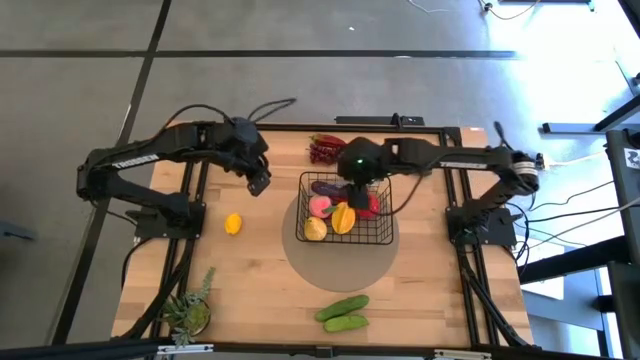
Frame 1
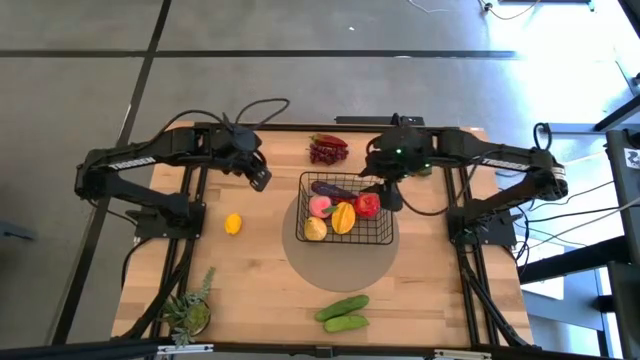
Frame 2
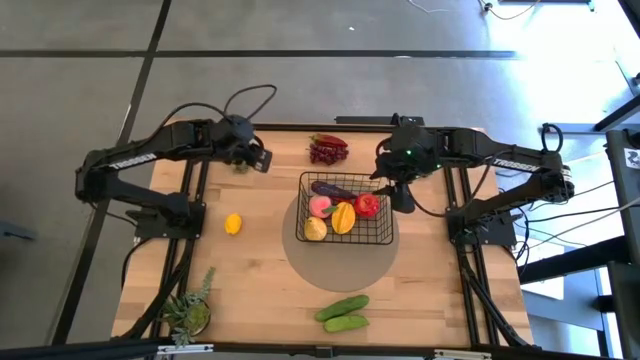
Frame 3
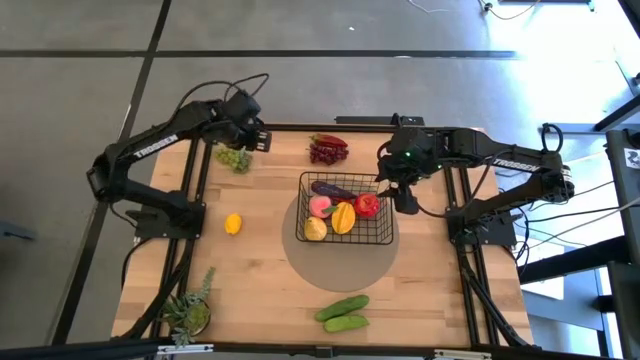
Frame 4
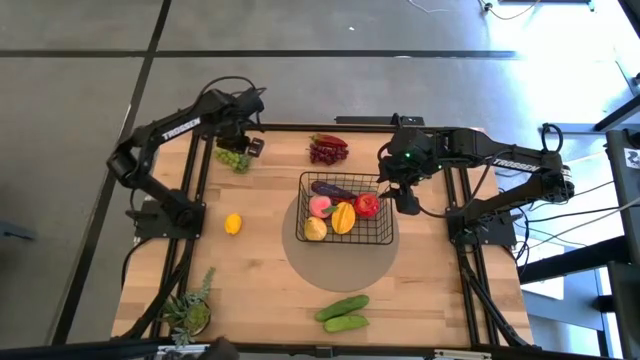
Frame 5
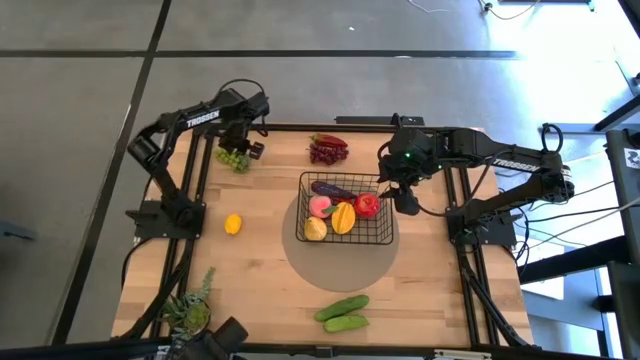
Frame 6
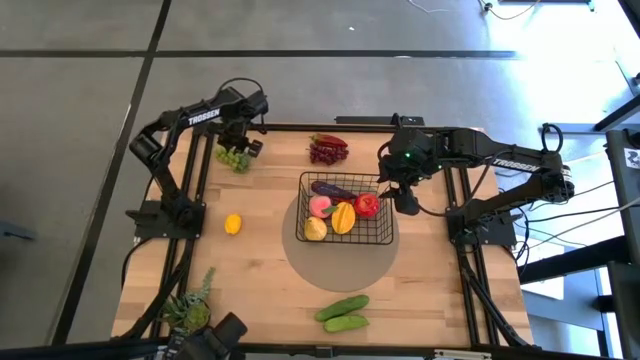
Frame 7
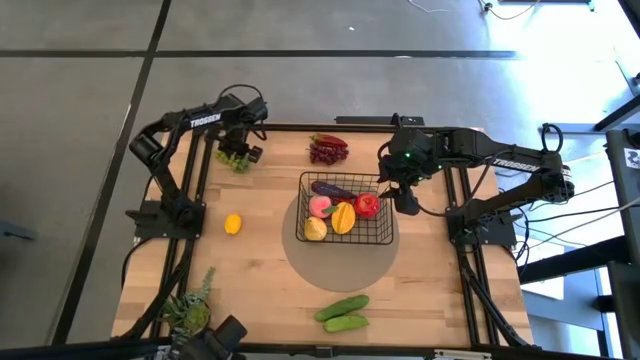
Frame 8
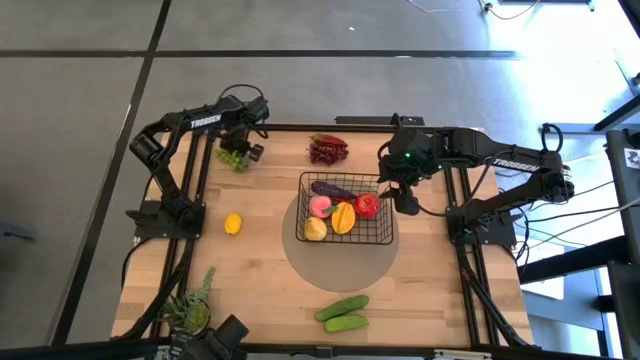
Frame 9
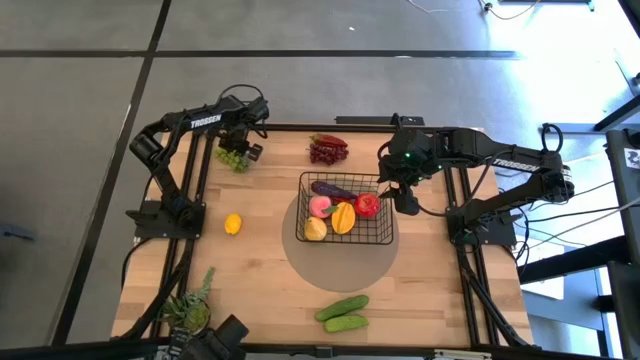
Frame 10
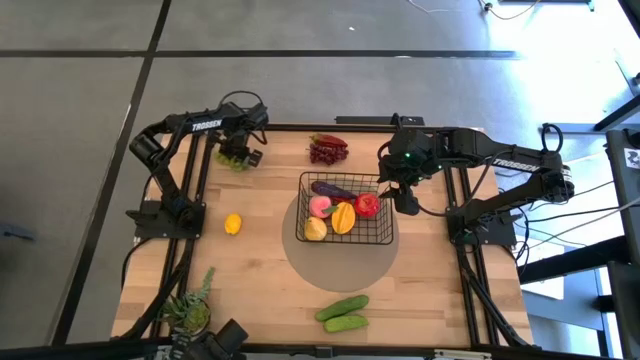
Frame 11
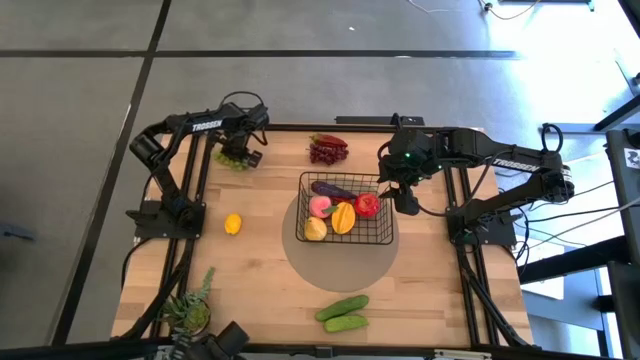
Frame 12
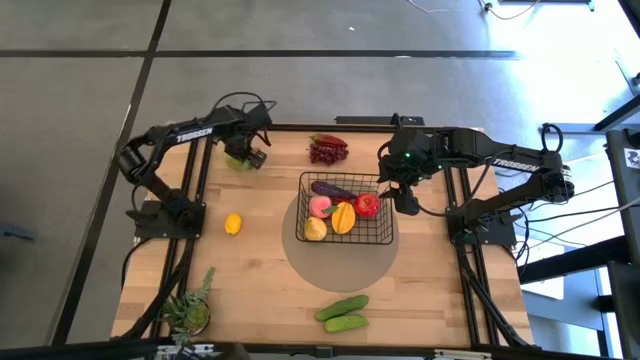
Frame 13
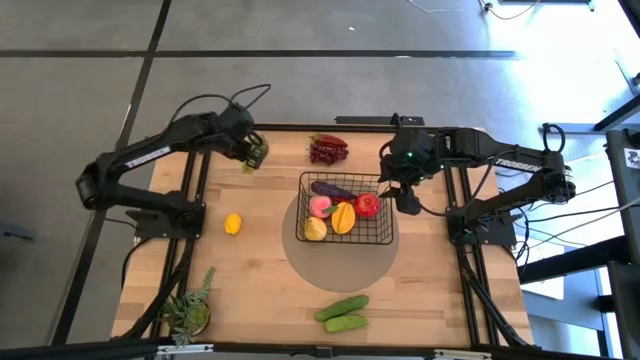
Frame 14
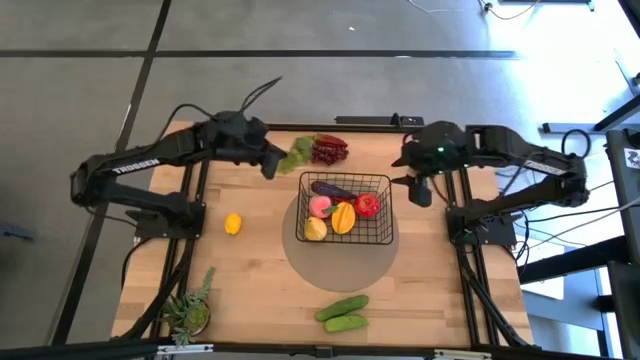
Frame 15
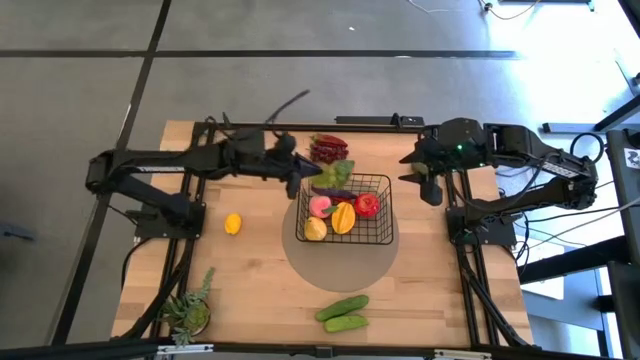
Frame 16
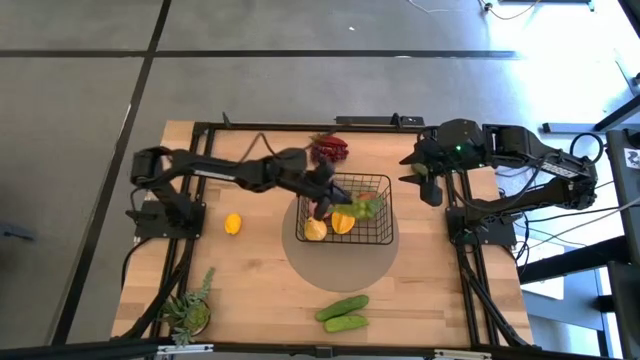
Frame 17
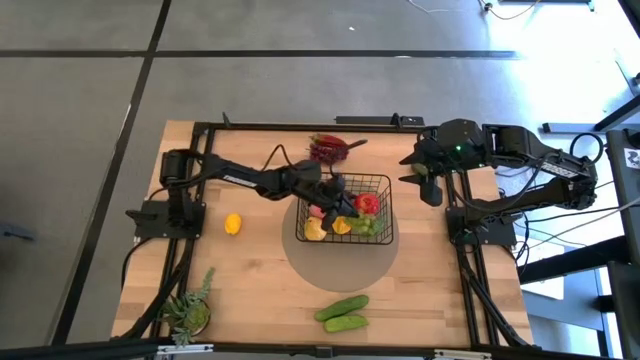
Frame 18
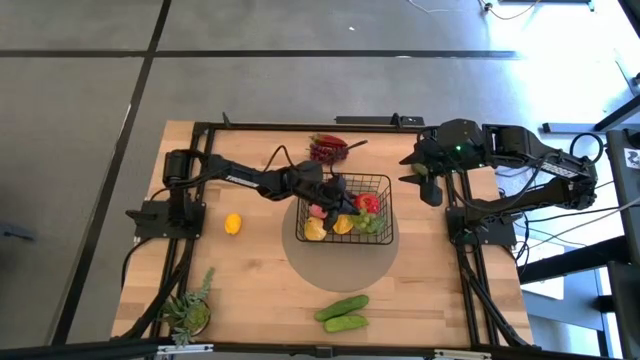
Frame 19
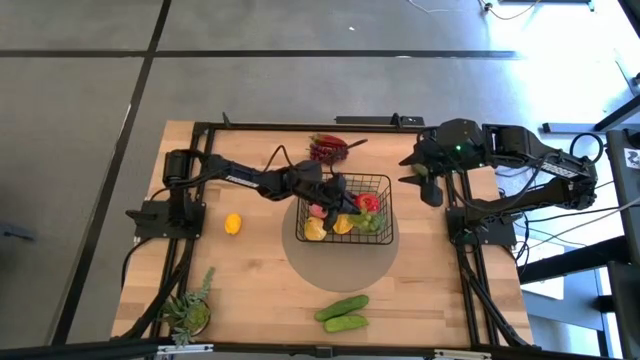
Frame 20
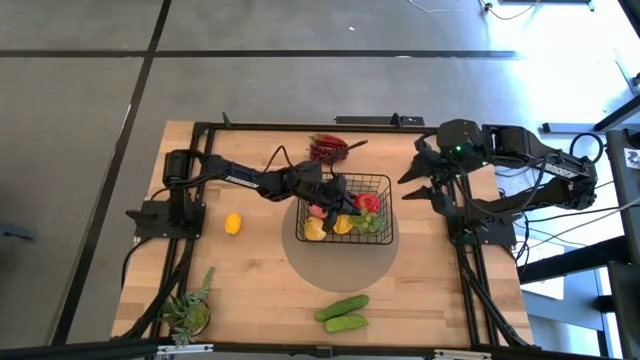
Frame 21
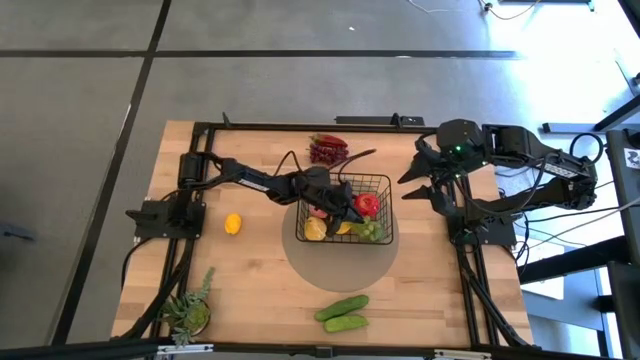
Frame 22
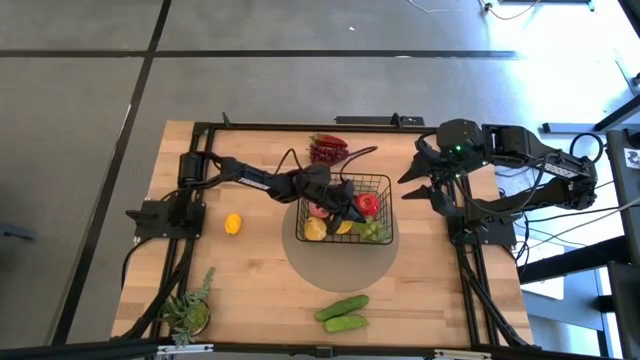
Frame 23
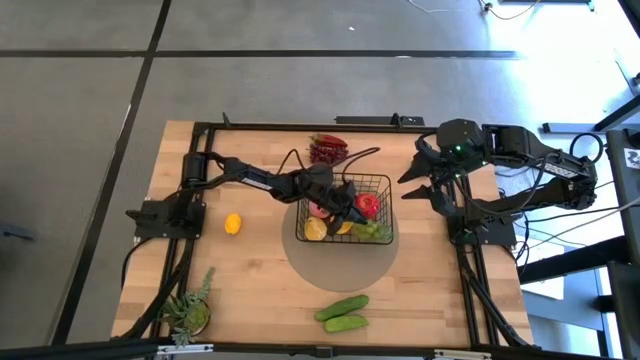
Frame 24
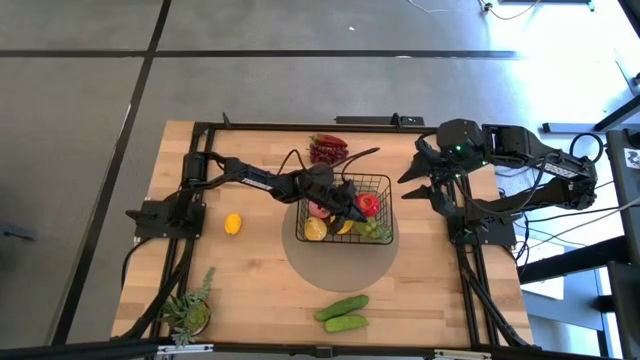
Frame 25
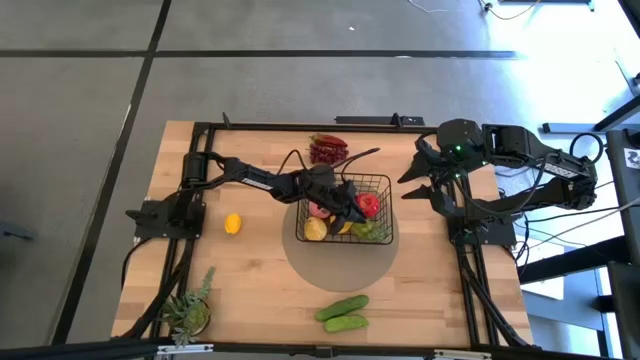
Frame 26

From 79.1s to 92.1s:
Task: Build produce basket
Put the green grapes into the black wire basket

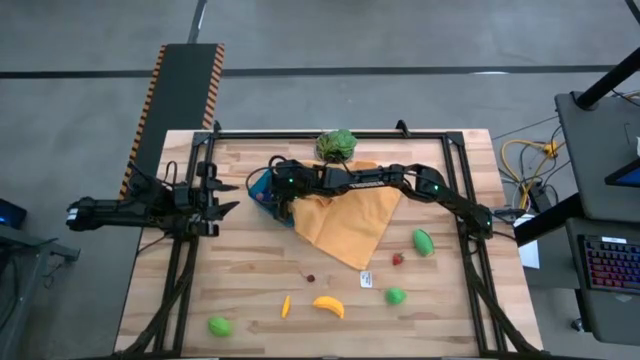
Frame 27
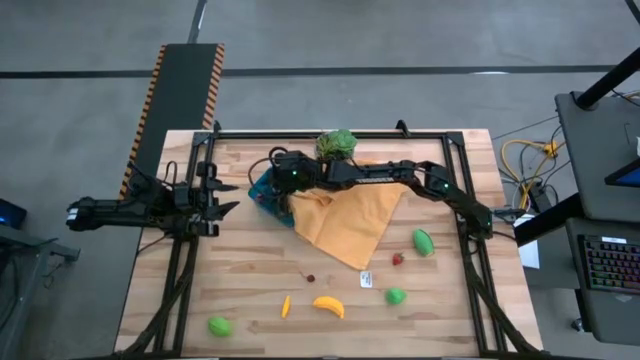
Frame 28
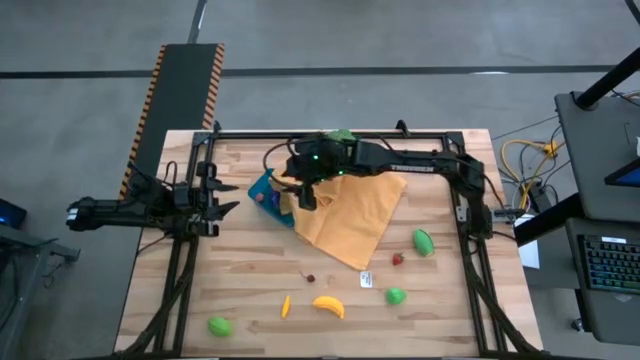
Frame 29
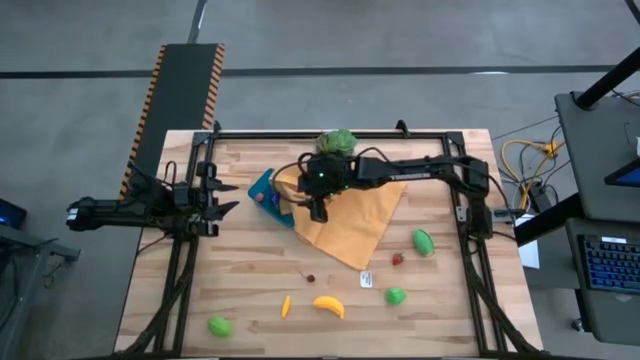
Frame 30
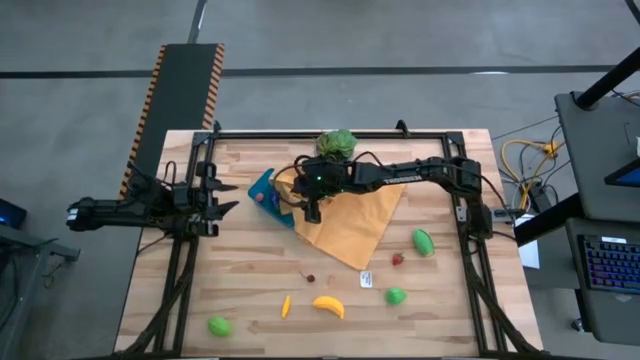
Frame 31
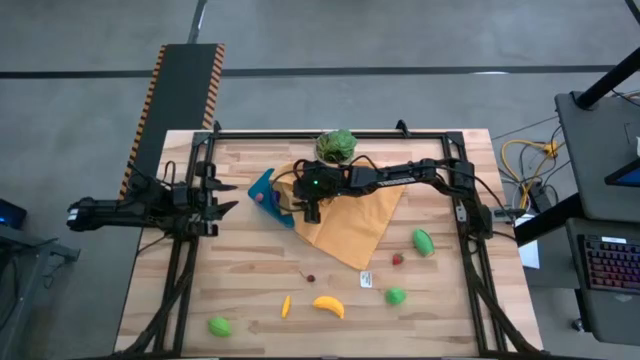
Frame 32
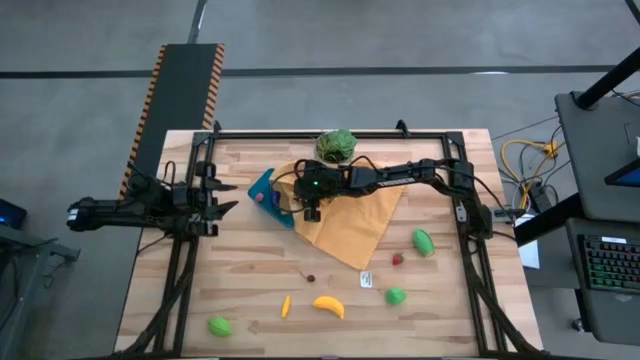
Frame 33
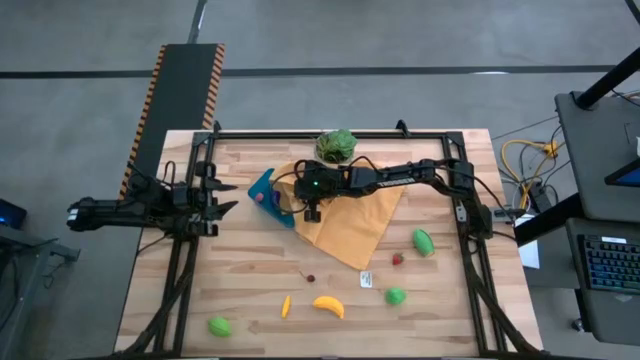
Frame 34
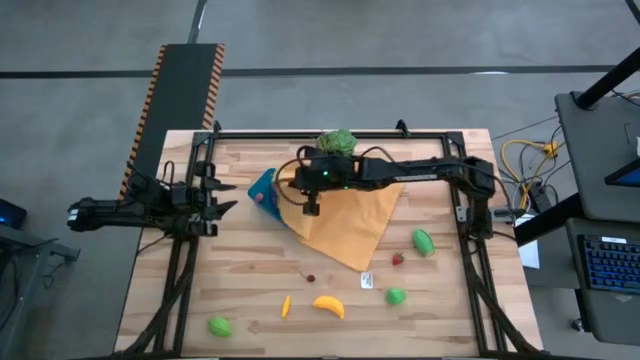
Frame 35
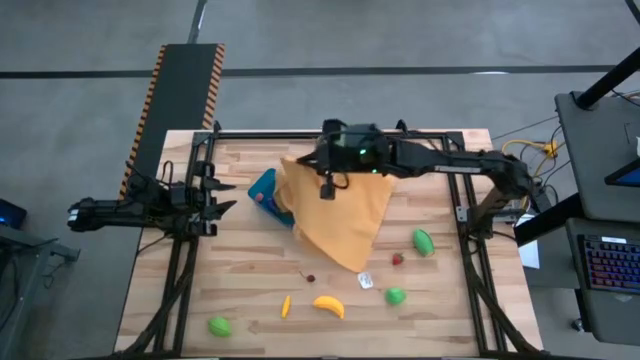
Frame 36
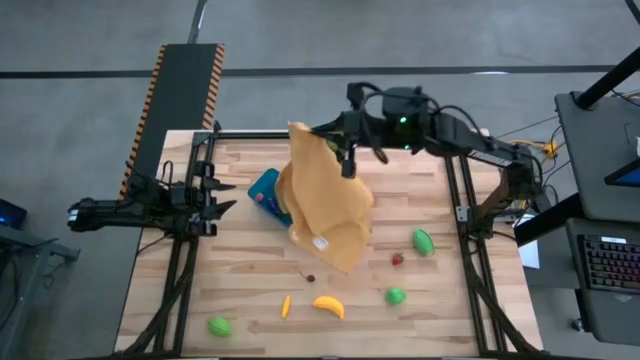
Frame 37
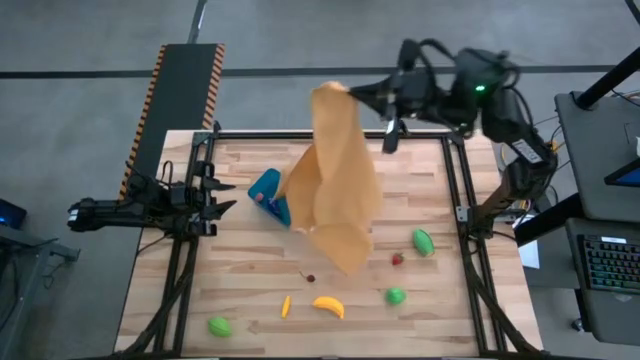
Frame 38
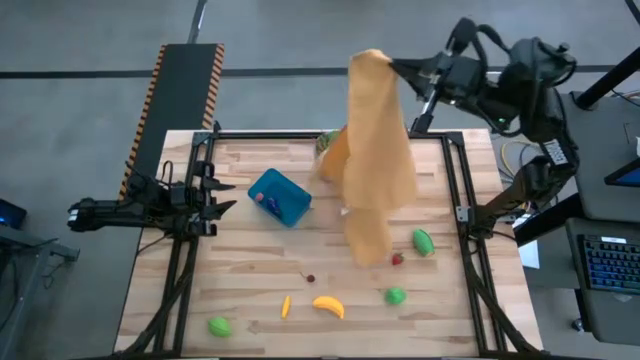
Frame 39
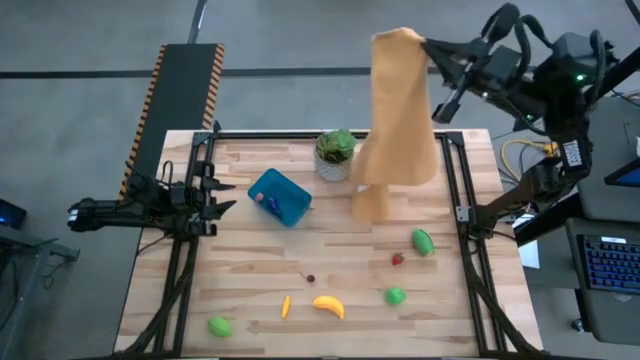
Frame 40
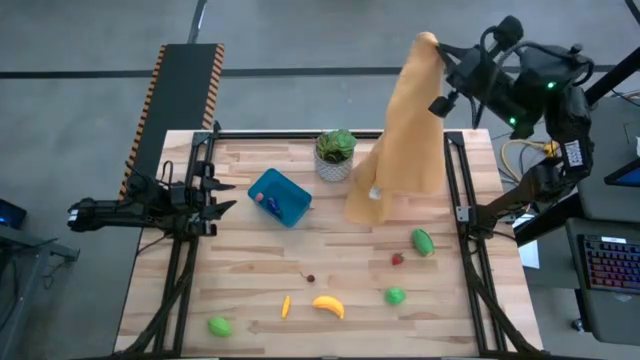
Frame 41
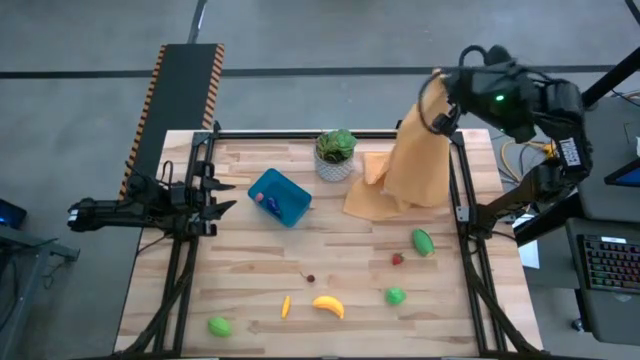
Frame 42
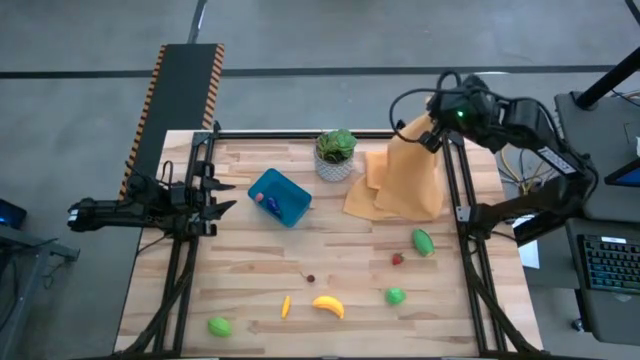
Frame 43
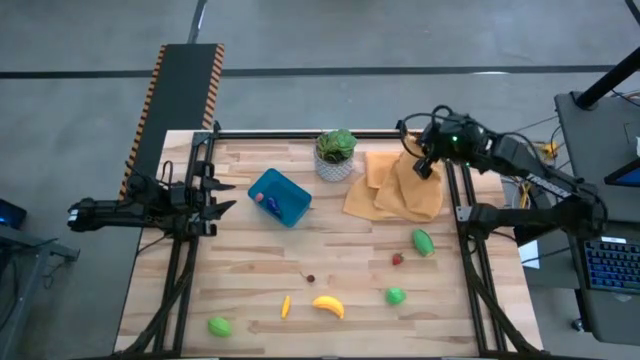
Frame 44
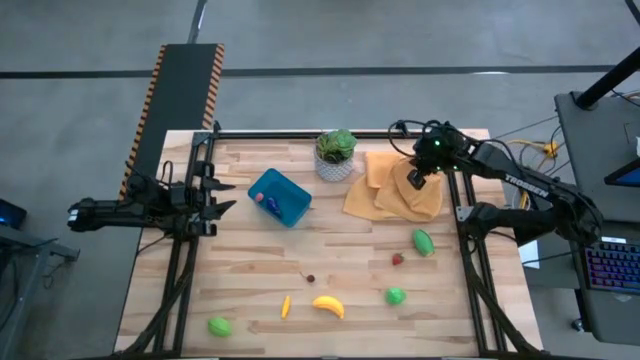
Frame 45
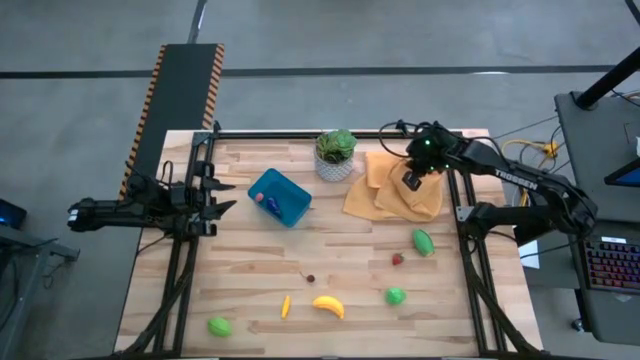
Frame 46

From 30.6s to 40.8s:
Task: Pick and placing Produce into tupperware
Move the yellow towel to the top right of the table
